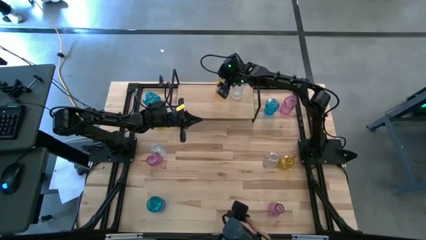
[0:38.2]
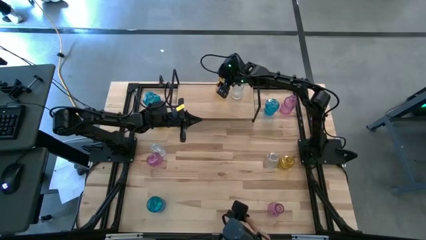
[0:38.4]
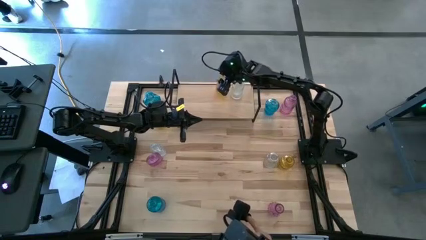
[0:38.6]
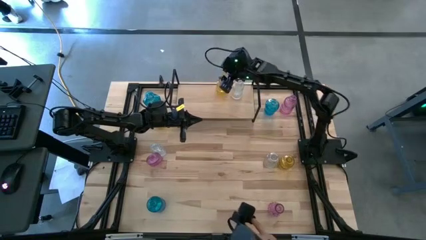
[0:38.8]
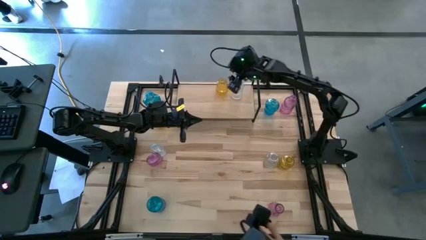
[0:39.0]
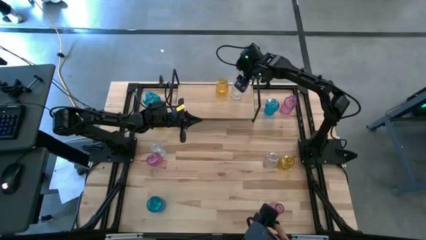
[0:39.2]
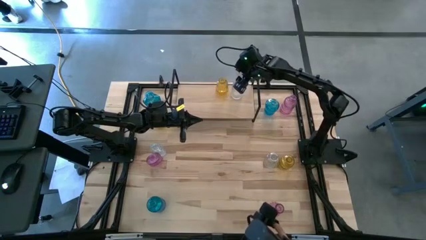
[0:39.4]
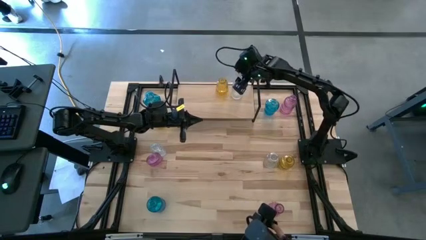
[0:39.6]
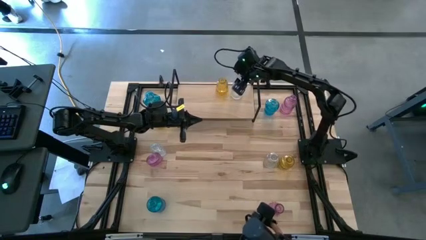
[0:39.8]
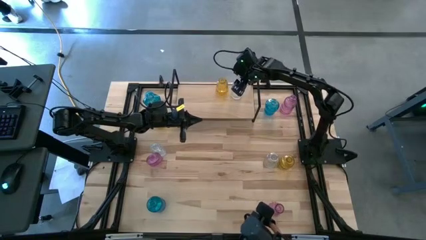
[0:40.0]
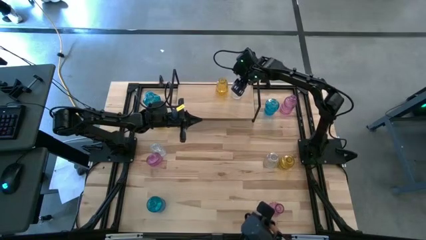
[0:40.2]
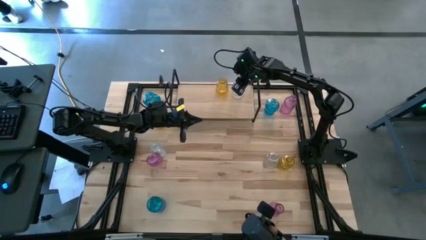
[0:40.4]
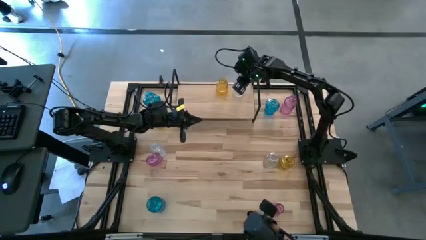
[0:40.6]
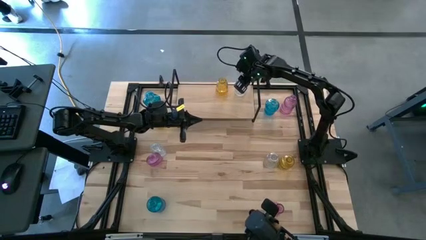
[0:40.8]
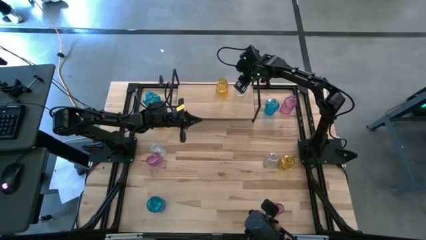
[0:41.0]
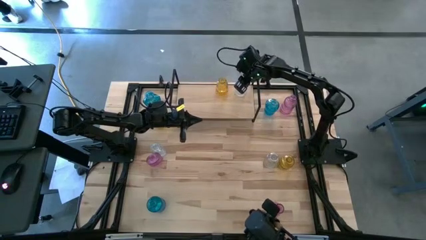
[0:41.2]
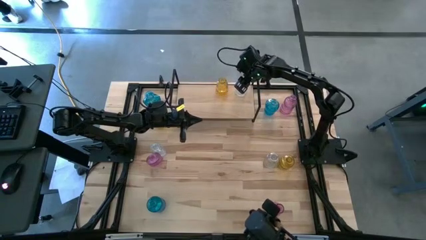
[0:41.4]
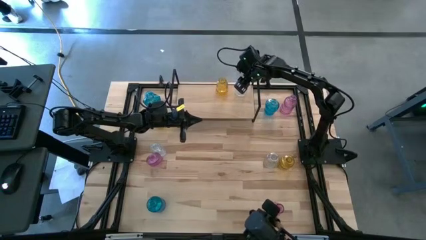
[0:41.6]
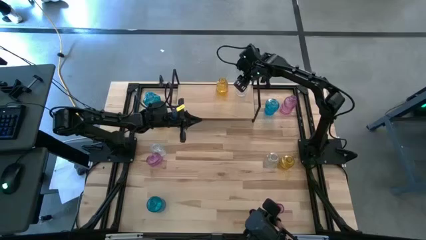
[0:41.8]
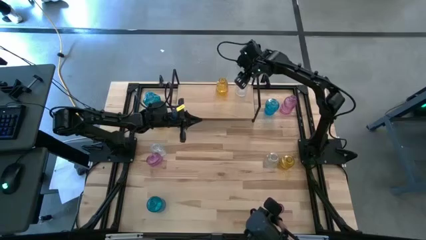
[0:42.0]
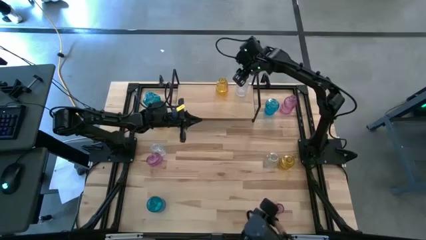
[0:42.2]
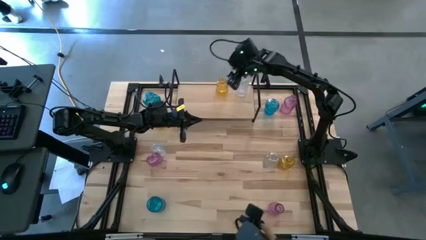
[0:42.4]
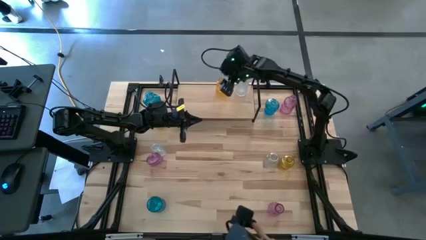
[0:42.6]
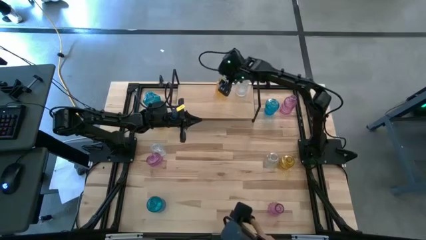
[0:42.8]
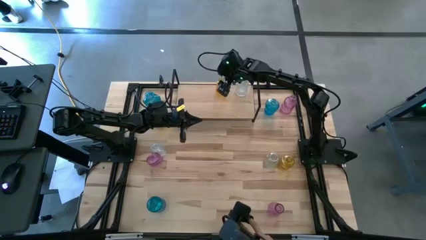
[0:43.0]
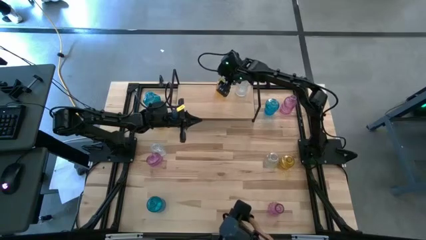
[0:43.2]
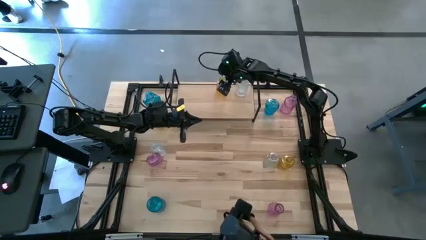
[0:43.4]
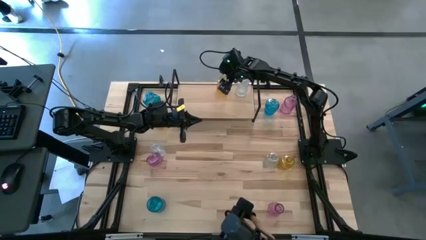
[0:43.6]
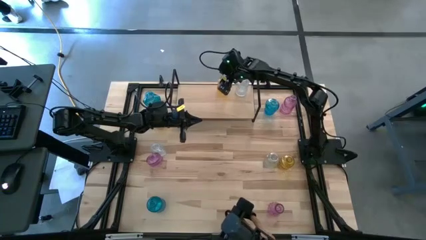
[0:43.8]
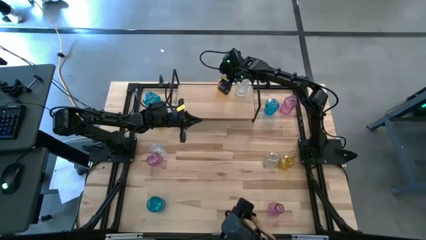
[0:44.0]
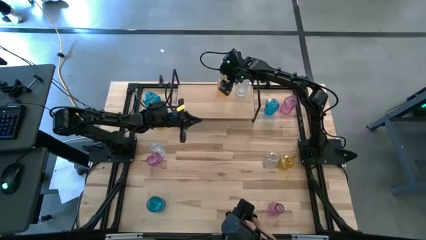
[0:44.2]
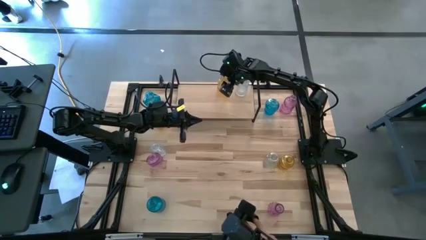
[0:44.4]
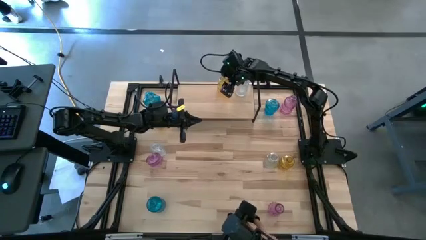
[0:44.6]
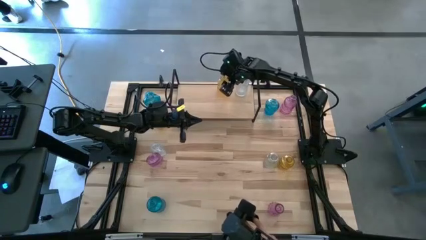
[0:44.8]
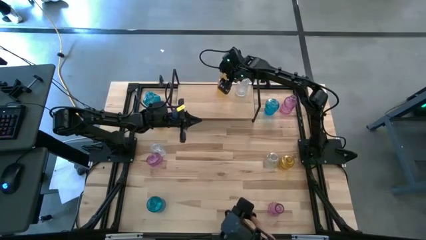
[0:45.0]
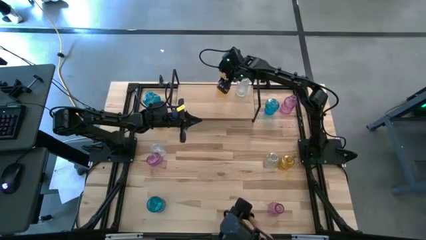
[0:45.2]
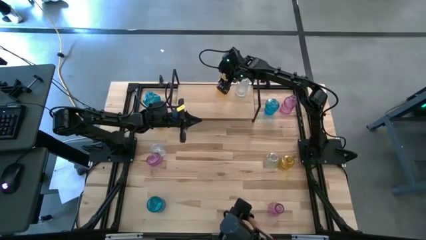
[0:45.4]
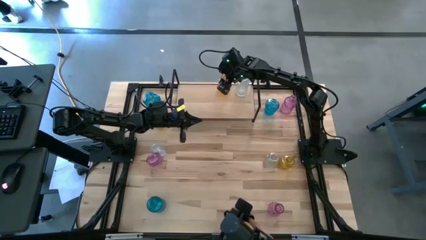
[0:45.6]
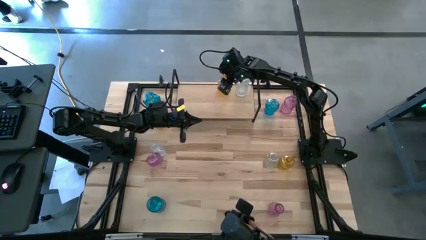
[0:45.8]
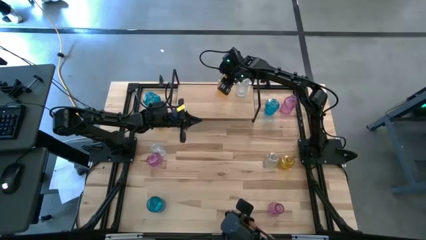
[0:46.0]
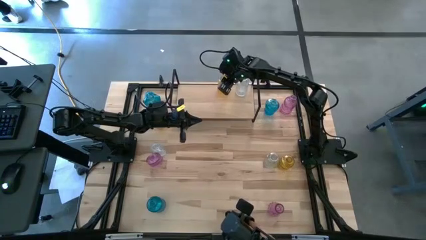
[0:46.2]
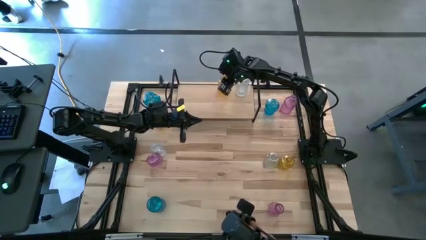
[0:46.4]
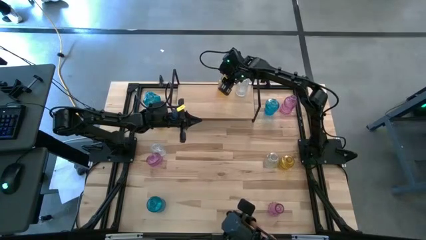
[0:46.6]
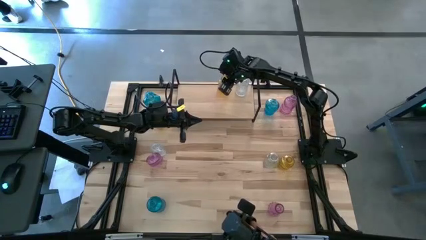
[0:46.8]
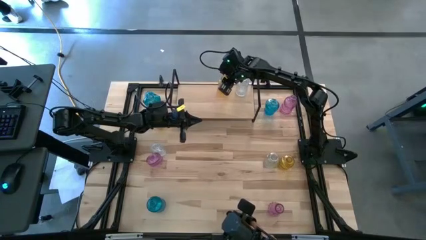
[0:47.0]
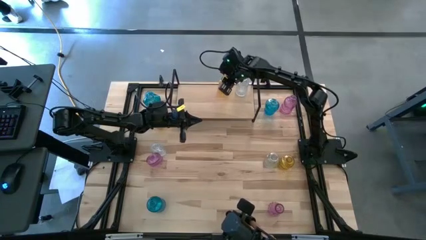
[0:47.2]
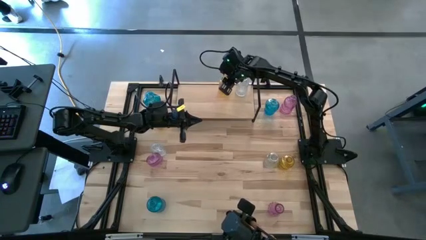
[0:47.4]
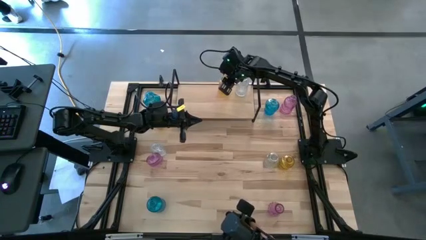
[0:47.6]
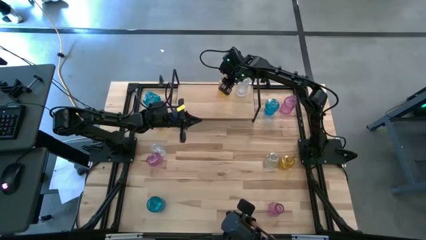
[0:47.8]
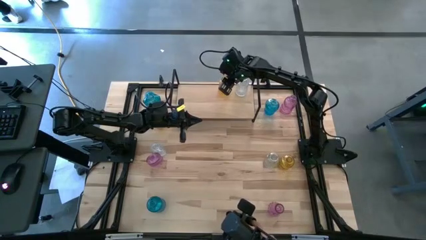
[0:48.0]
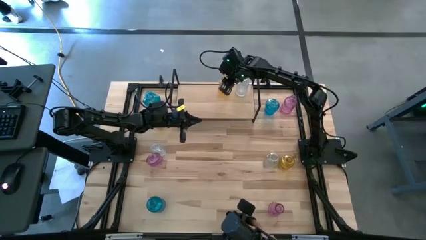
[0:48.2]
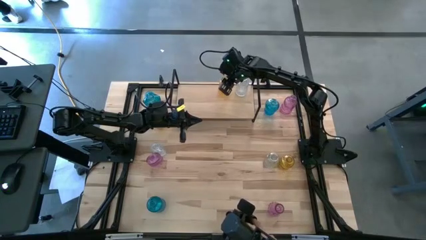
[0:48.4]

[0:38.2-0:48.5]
Task: sort vases onto shelf
Adjust the vases on the shelf

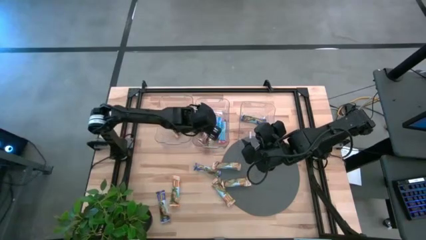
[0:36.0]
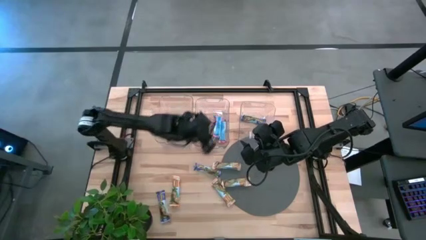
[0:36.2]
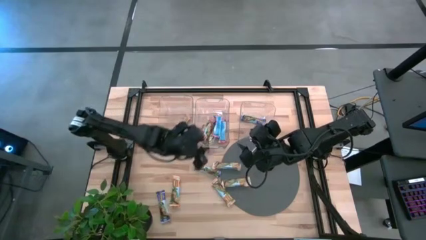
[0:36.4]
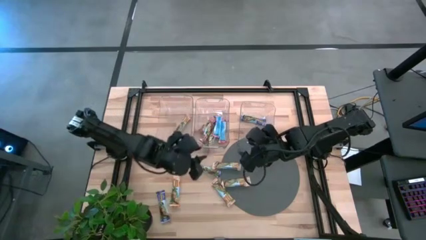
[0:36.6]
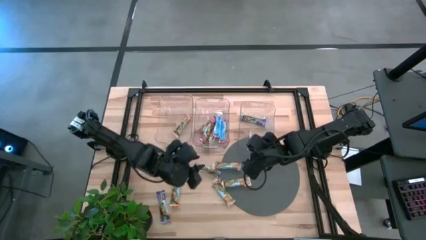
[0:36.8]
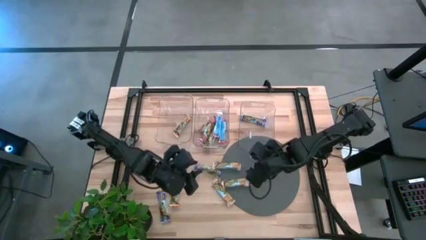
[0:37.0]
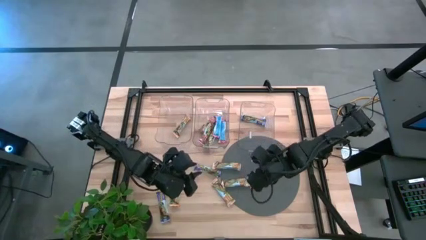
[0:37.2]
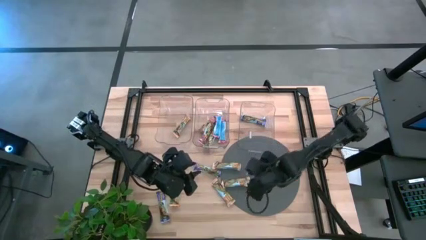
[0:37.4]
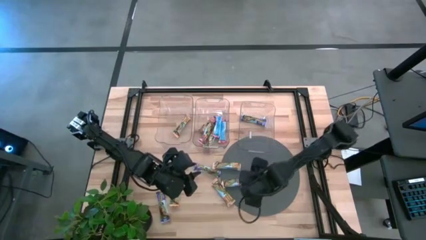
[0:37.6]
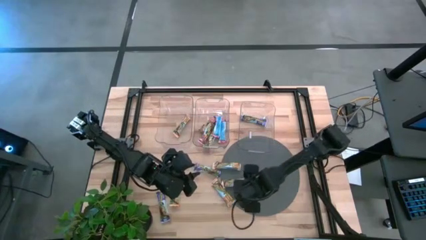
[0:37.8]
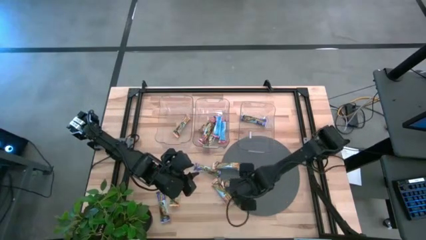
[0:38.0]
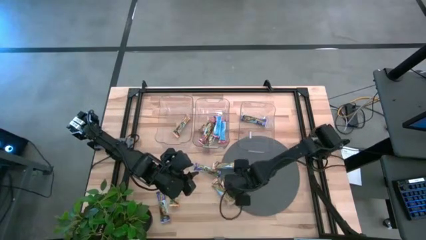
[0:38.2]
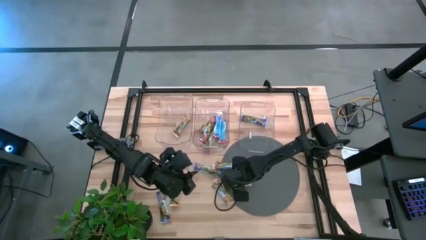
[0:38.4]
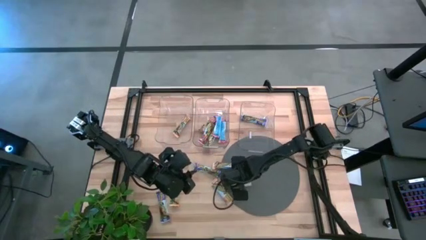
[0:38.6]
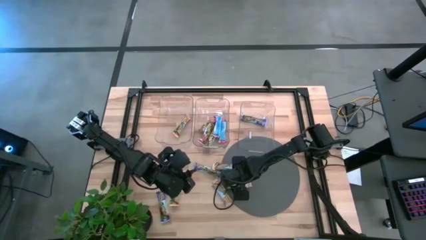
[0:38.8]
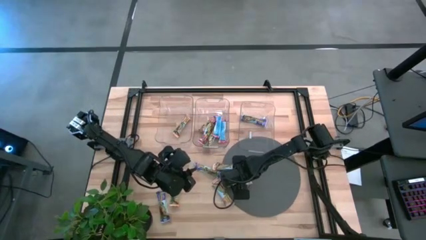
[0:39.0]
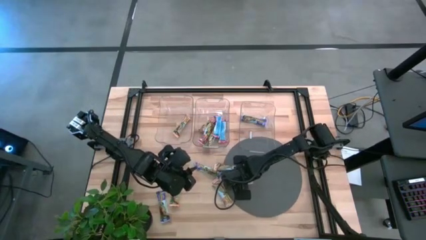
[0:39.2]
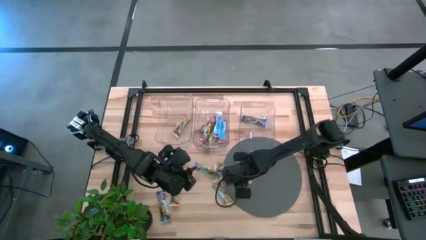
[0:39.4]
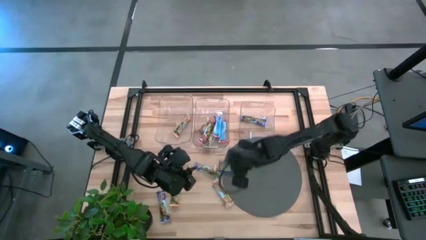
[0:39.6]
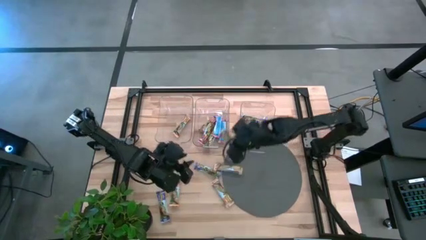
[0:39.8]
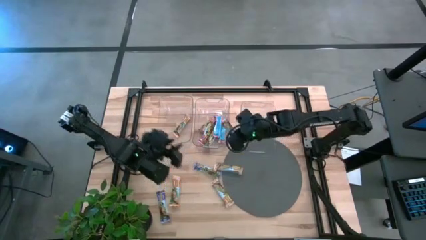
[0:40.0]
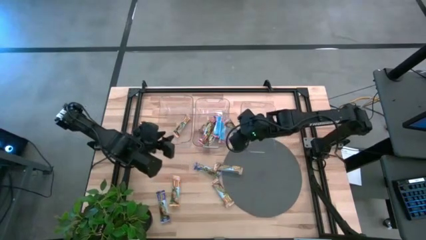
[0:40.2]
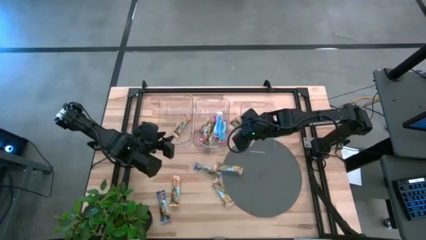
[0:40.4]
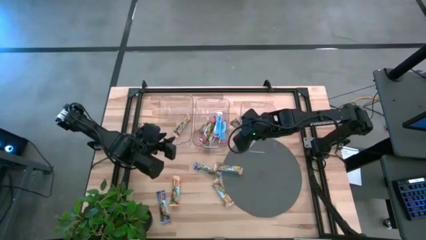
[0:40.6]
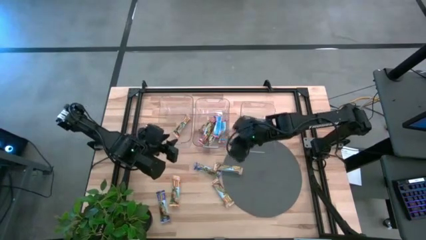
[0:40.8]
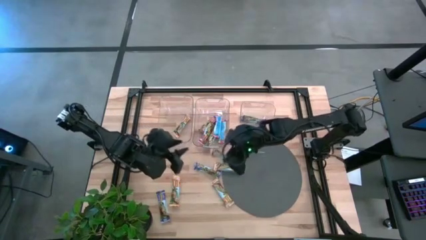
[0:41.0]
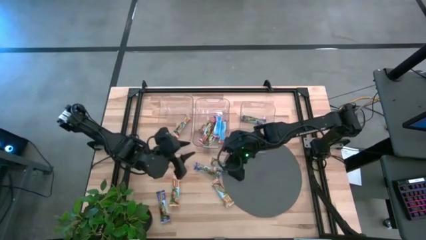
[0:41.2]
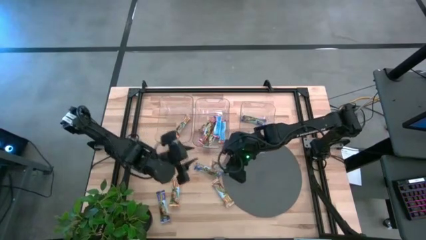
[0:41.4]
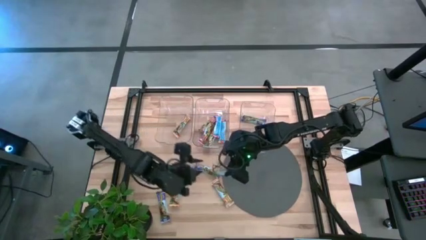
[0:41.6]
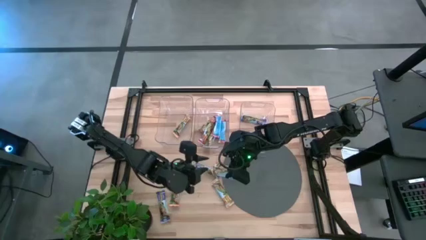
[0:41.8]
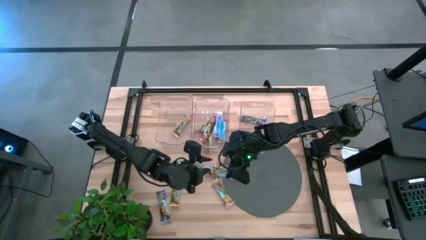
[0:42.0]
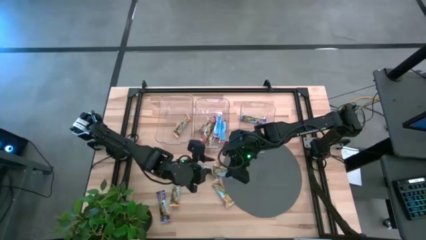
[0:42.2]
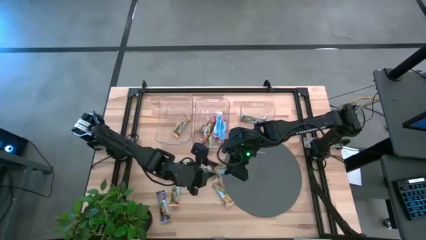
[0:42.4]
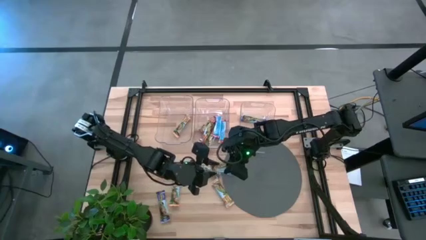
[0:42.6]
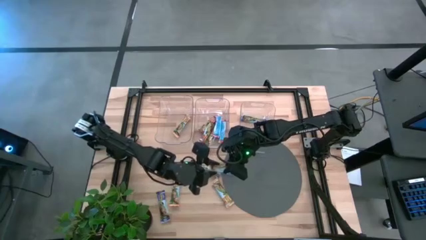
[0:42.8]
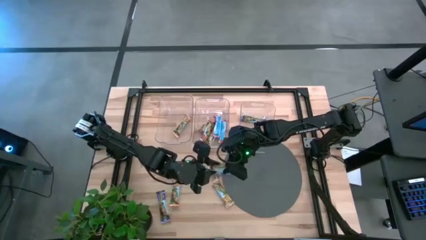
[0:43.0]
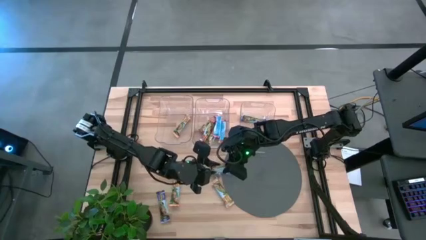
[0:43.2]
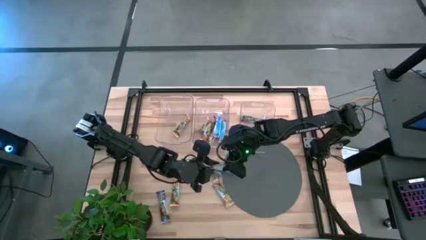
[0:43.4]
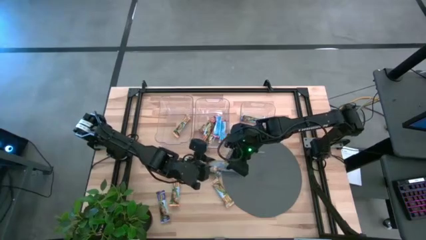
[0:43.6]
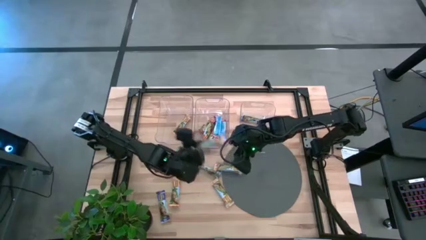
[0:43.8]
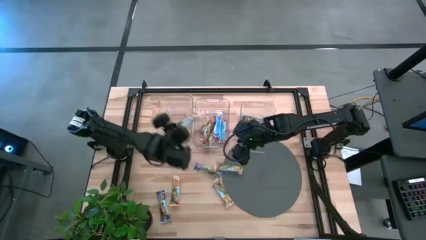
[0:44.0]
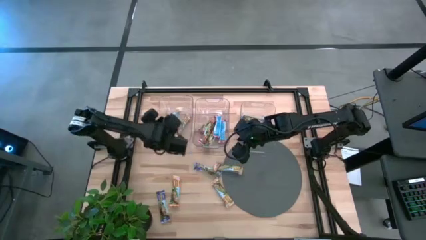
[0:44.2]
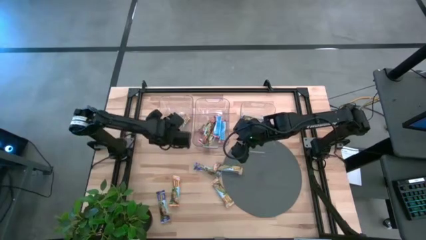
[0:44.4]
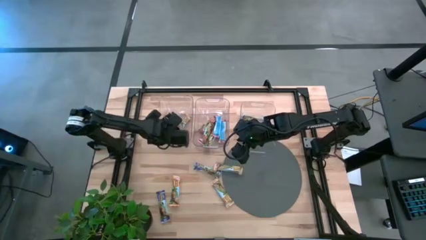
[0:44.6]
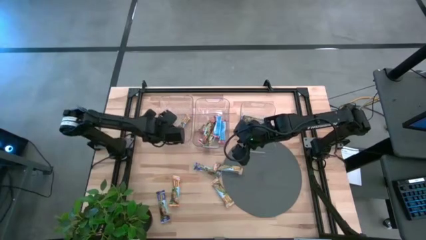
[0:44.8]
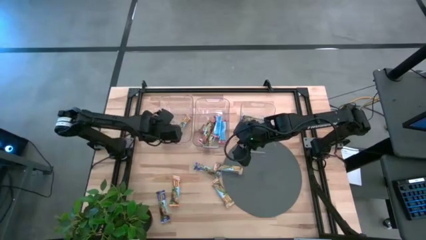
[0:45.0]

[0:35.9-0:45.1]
Task: Pick and place Granola Bars by type
Put the yellow granola bar into the left transparent bin
